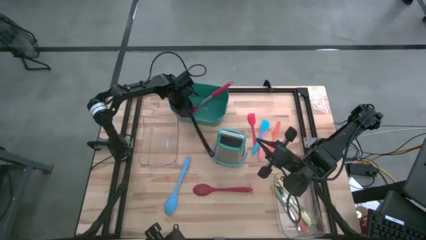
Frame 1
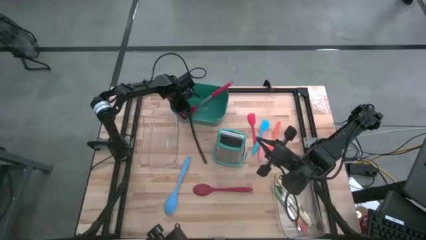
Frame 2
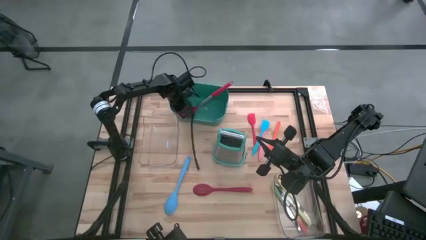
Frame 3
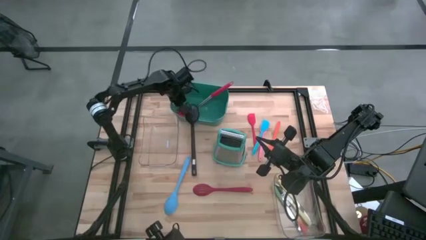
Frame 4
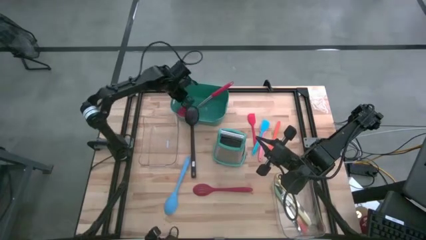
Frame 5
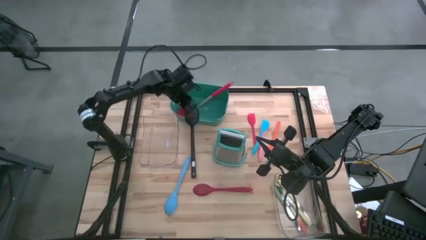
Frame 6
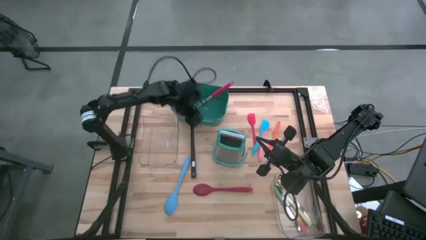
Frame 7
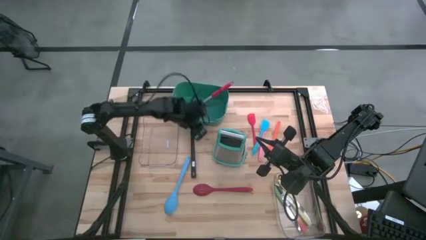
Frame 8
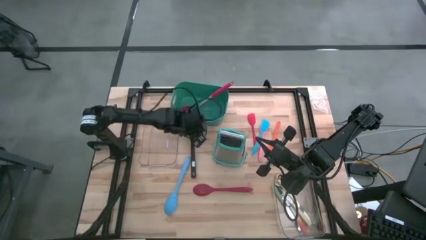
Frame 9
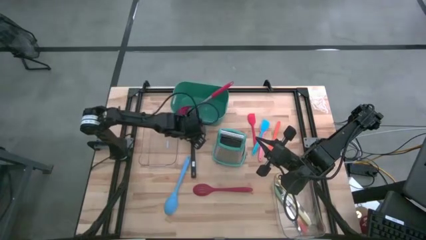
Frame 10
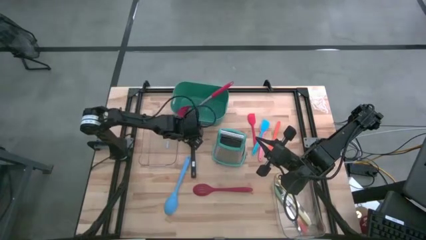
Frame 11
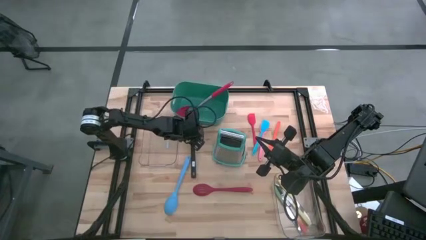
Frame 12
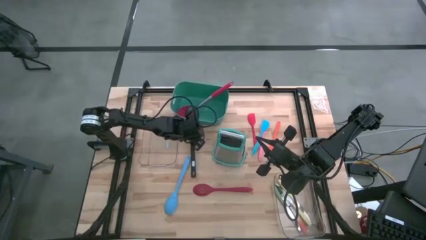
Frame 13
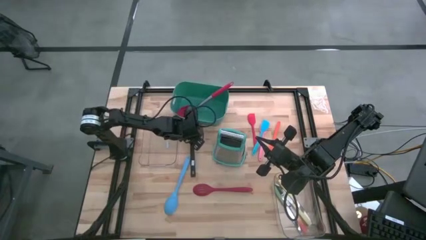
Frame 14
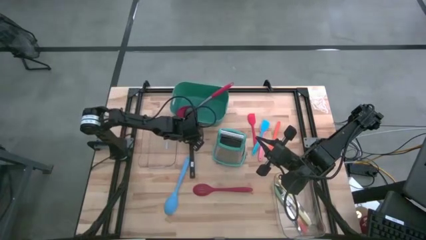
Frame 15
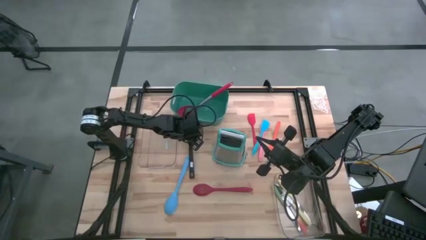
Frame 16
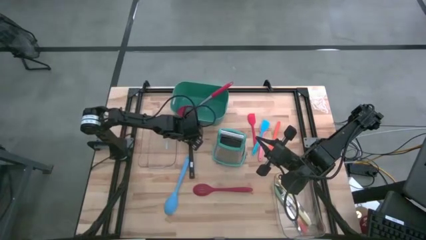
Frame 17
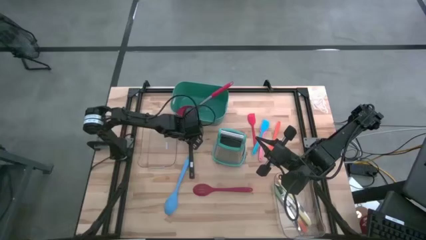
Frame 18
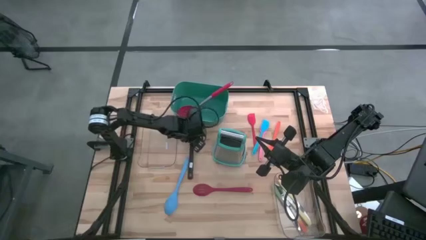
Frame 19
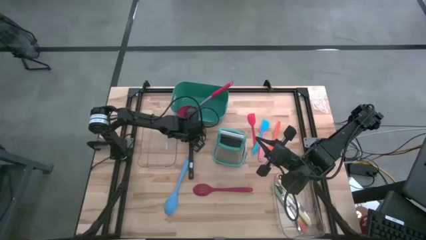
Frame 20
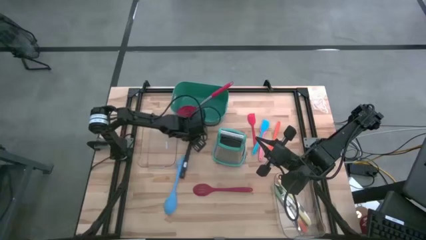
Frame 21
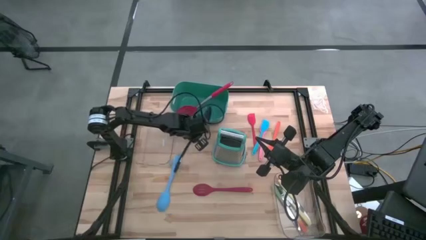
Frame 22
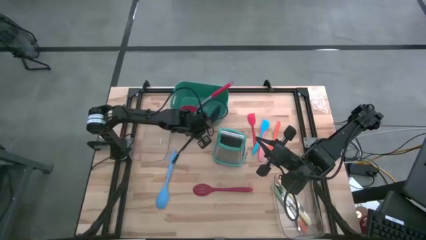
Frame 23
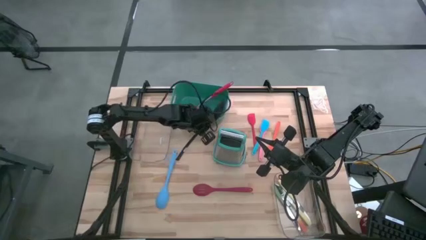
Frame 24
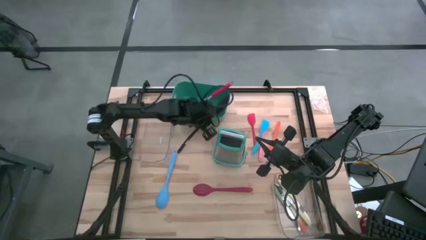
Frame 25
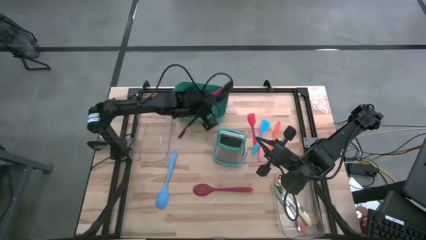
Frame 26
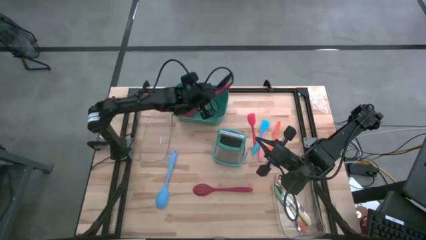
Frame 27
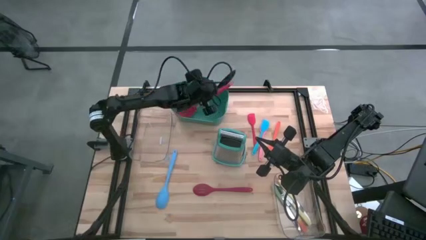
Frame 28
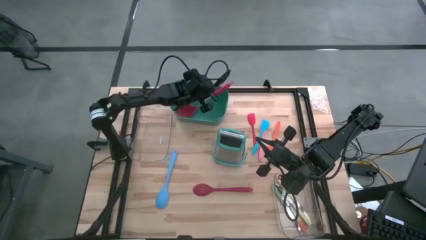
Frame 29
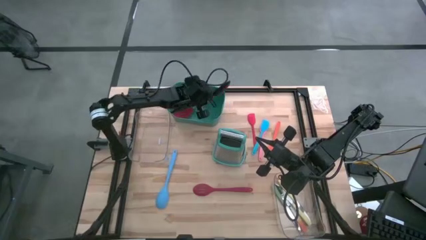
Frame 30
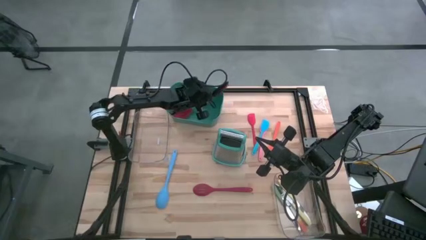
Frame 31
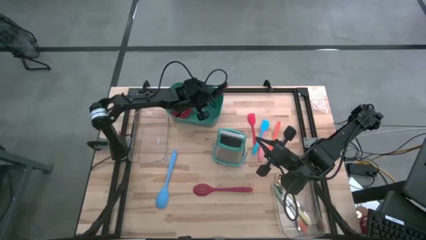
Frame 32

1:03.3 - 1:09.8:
Task: Pick & Place Kitchen Items
Put the black slotted spoon into the green bin

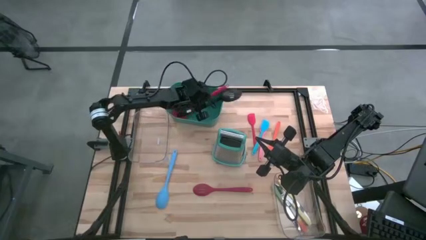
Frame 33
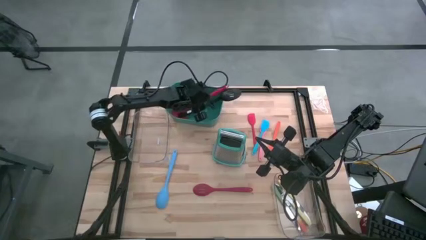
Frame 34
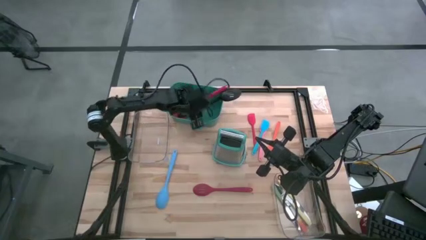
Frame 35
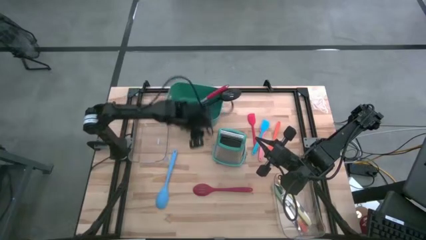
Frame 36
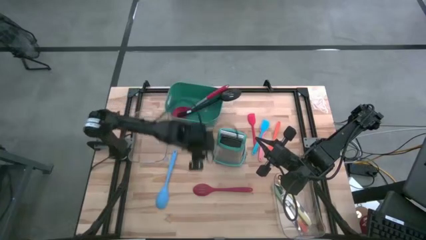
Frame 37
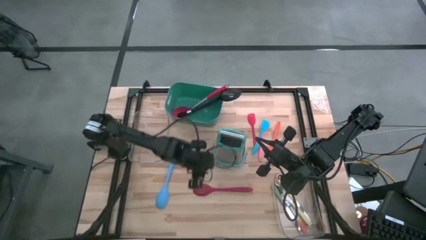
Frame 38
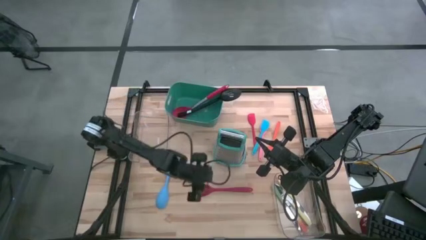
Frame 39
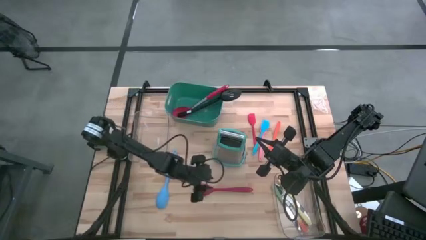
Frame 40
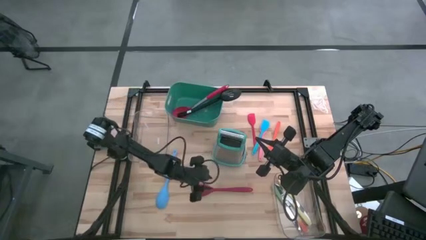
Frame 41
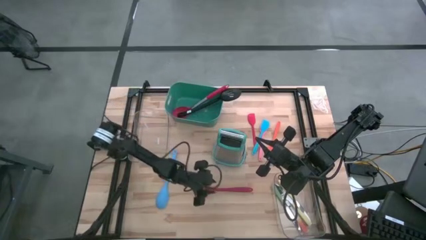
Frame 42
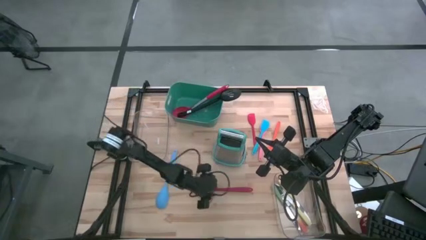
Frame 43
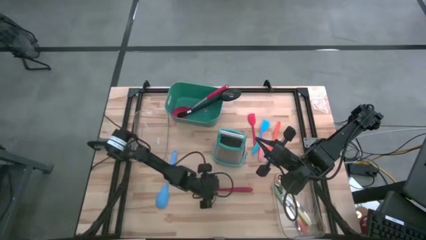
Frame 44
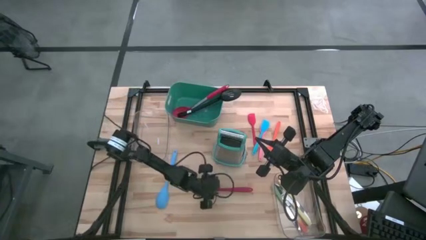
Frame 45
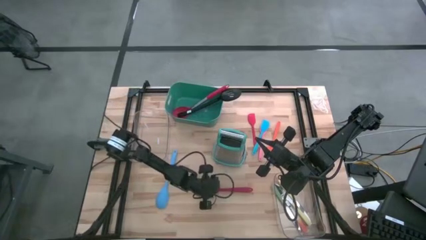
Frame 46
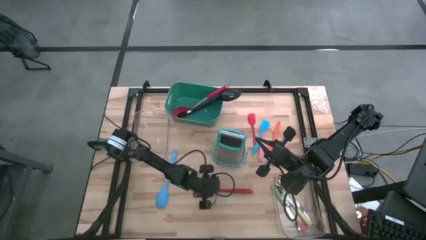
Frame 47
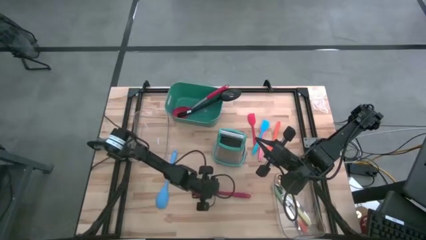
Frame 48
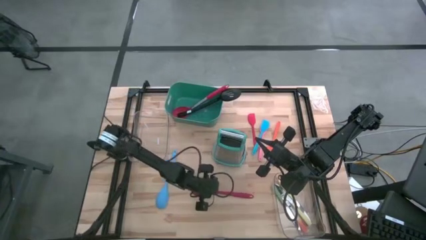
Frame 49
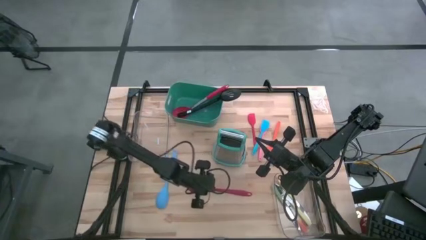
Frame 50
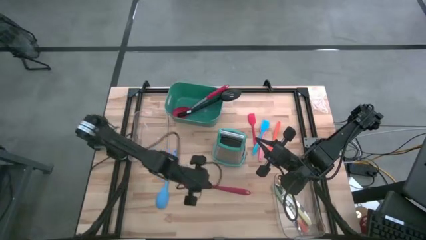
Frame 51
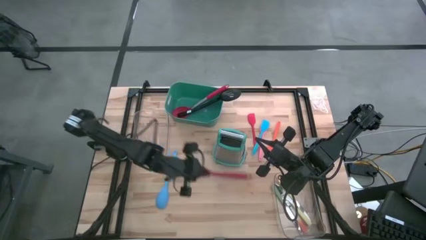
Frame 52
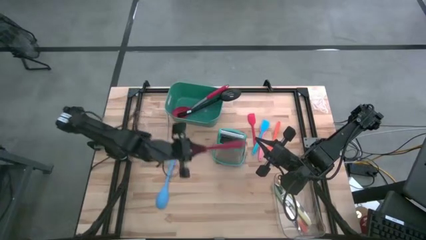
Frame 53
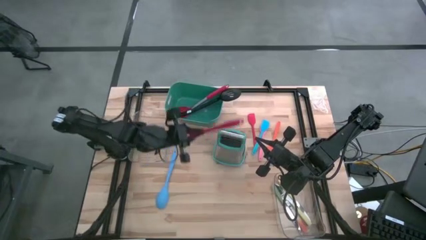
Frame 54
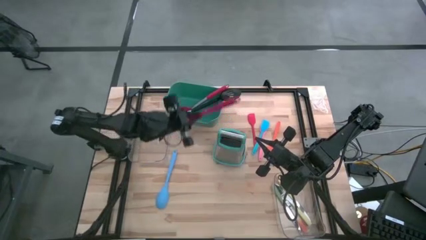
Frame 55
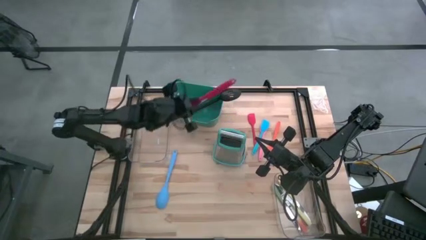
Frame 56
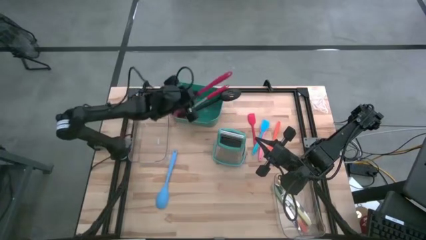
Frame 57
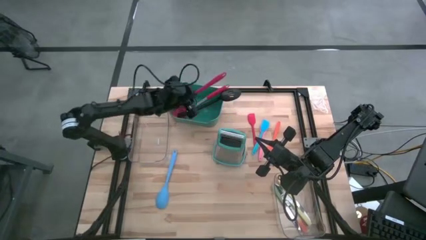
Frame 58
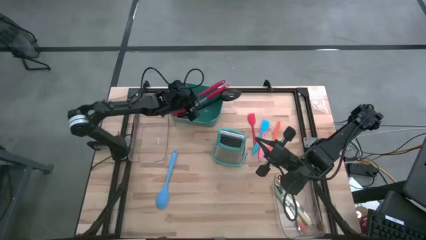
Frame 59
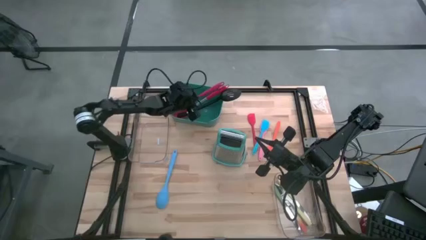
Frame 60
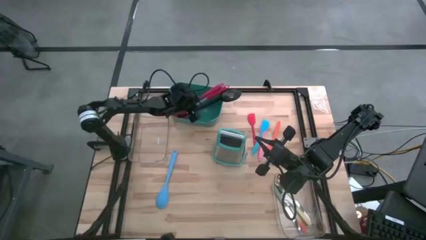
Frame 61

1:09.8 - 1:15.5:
Put the red slotted spoon into the green bin
